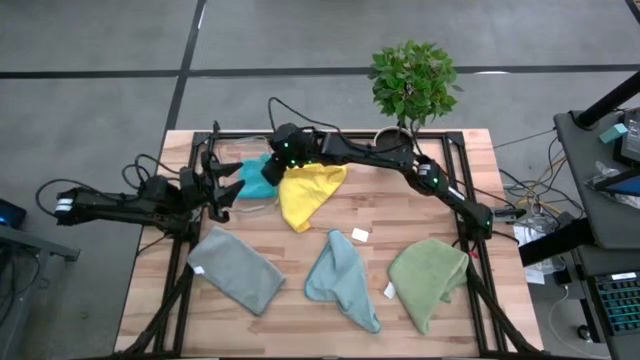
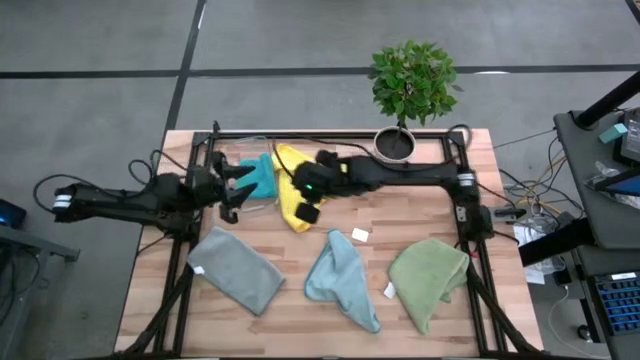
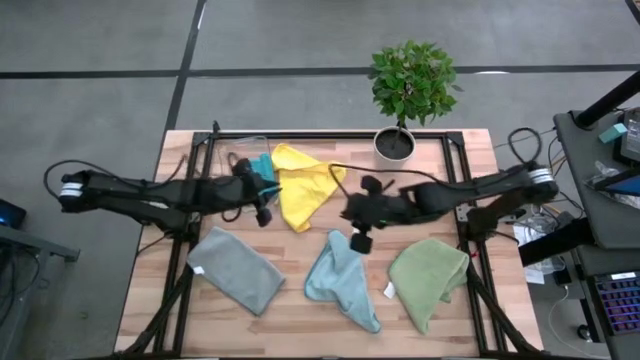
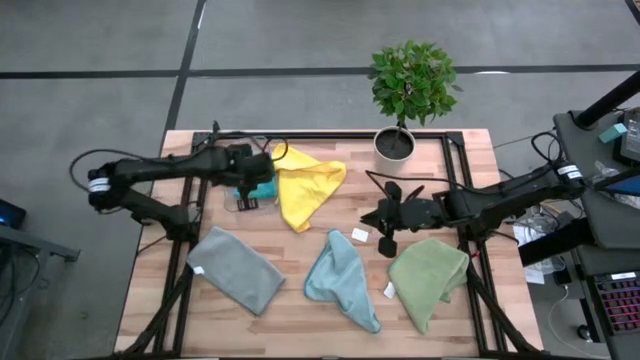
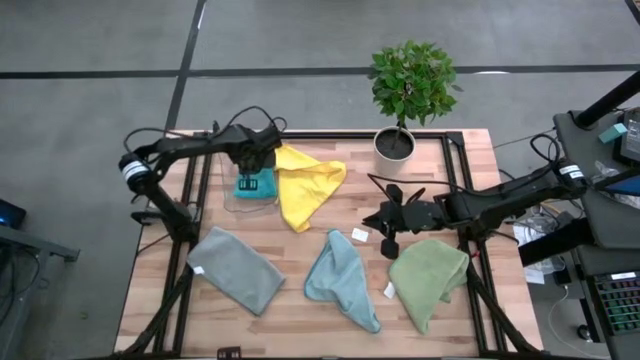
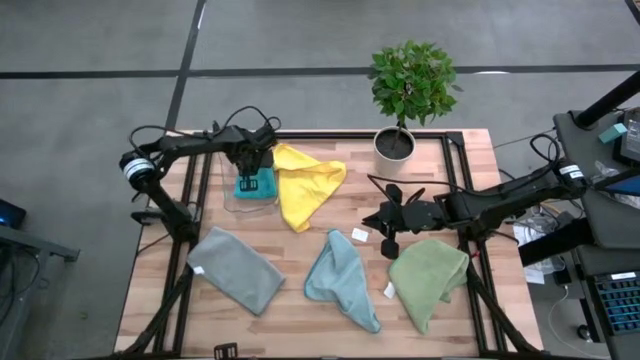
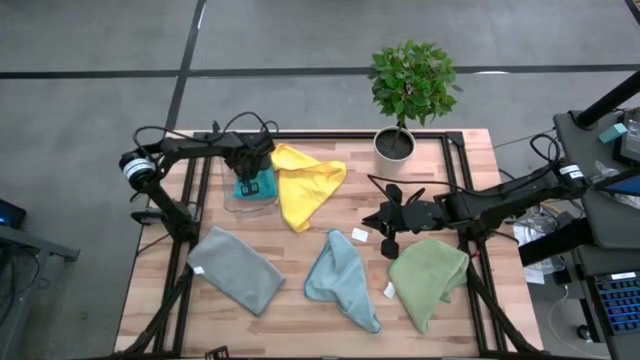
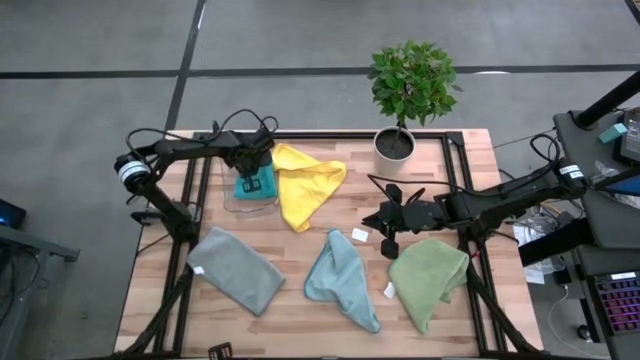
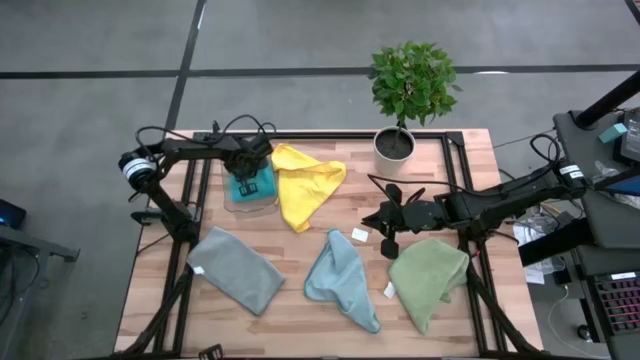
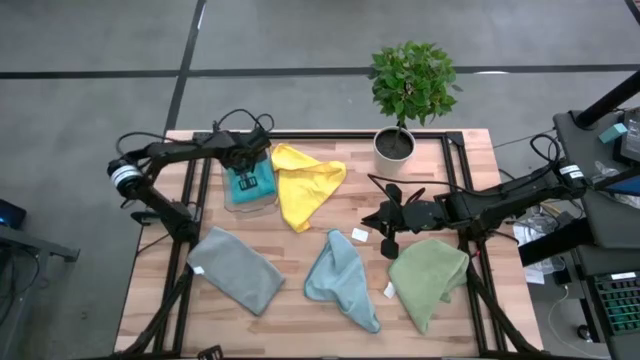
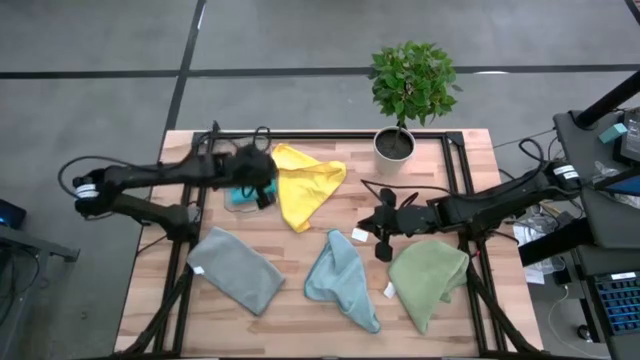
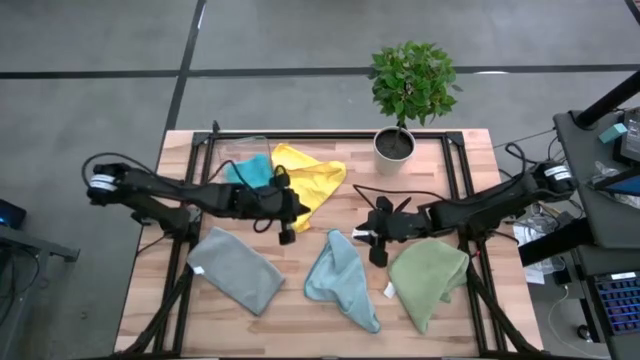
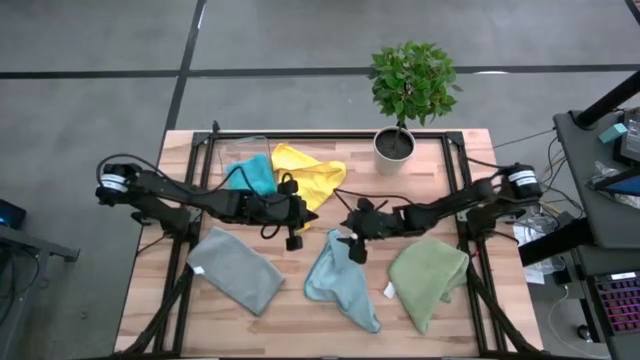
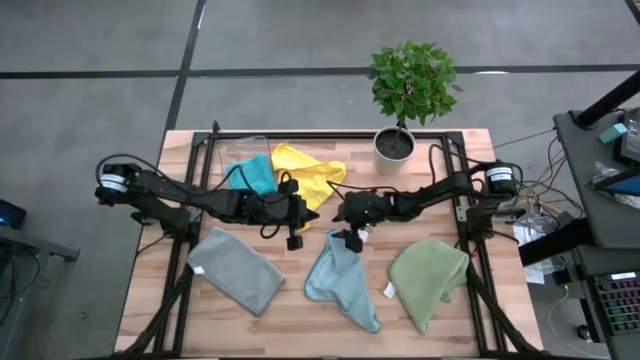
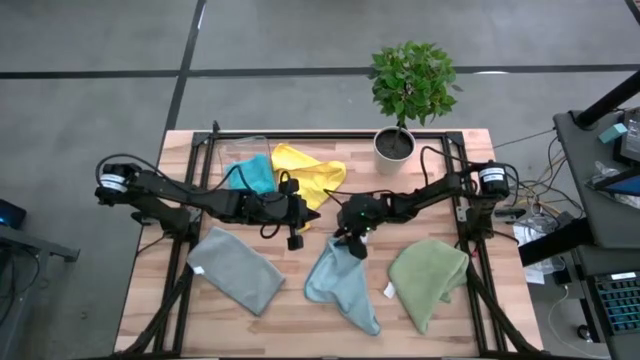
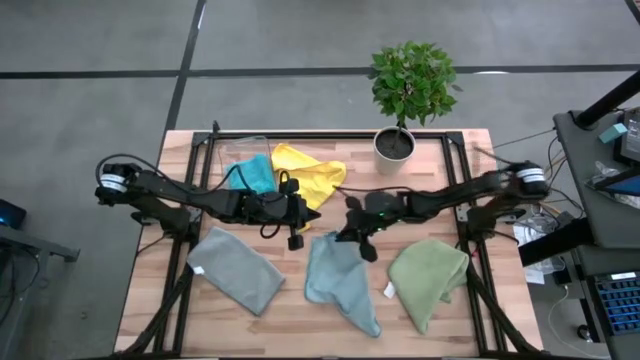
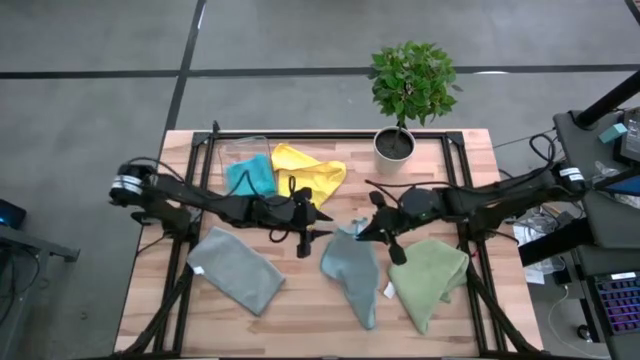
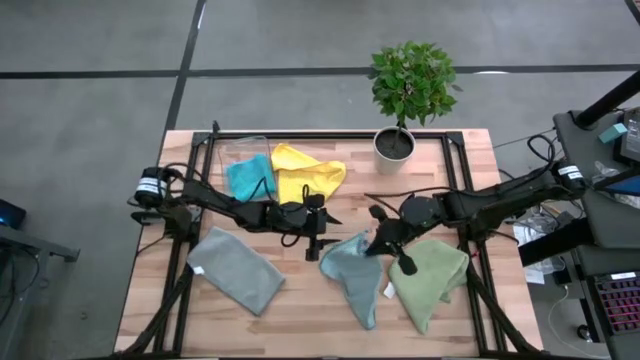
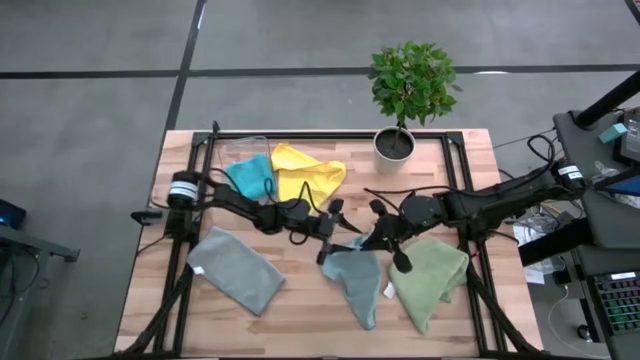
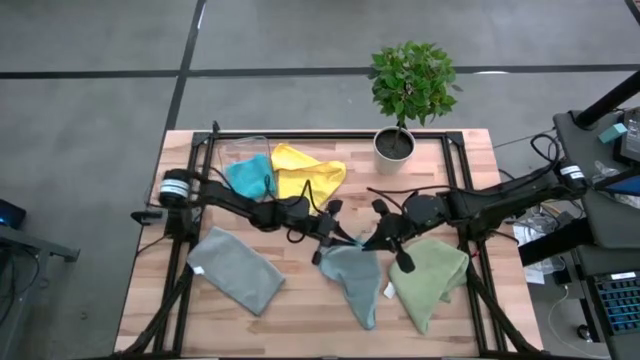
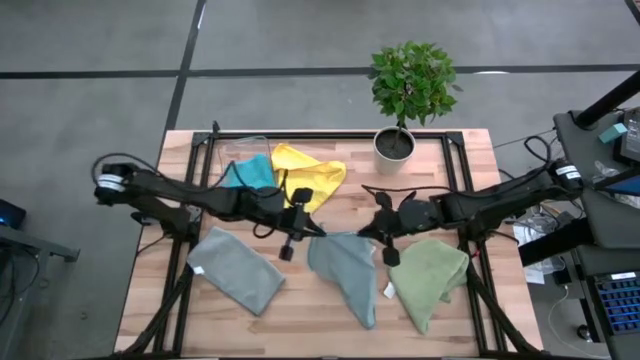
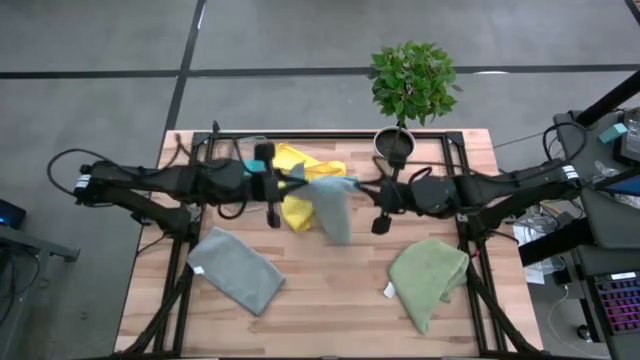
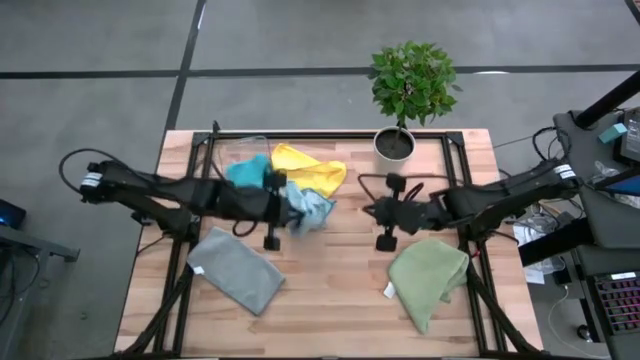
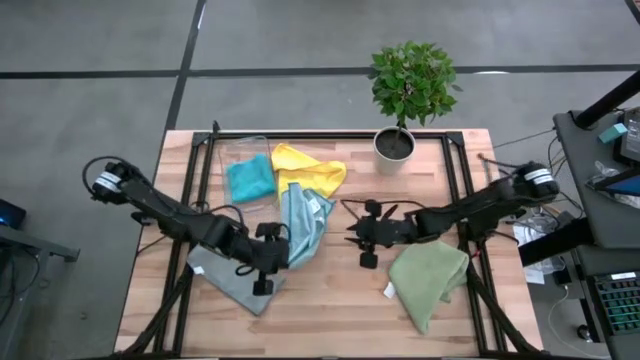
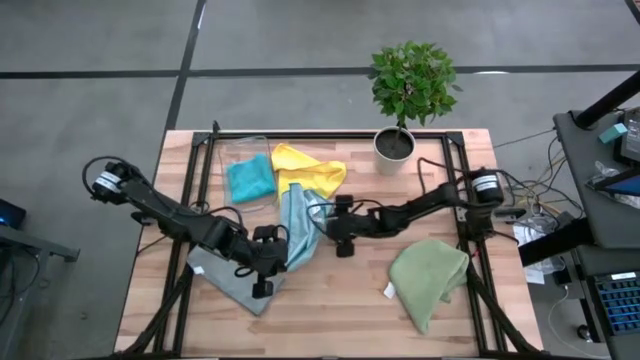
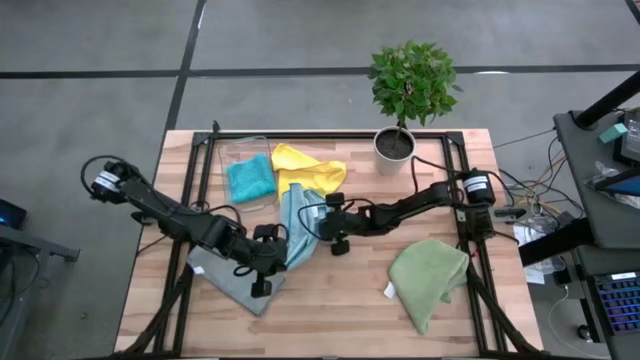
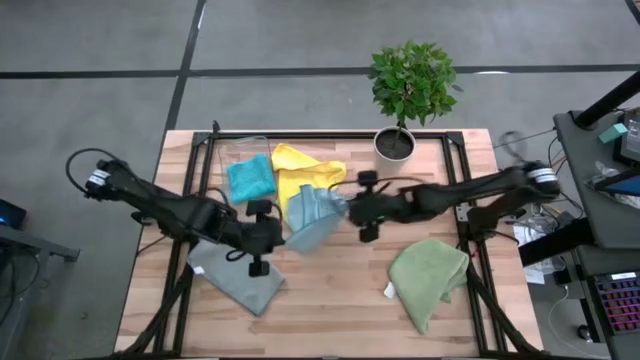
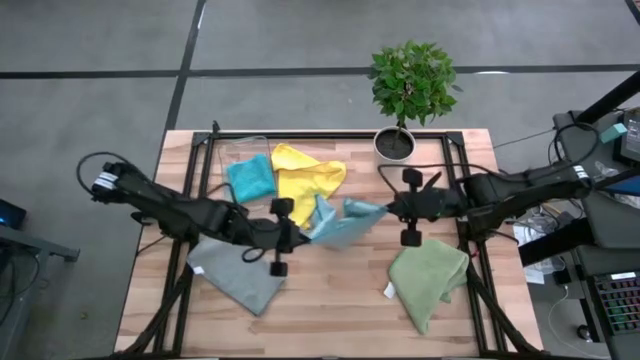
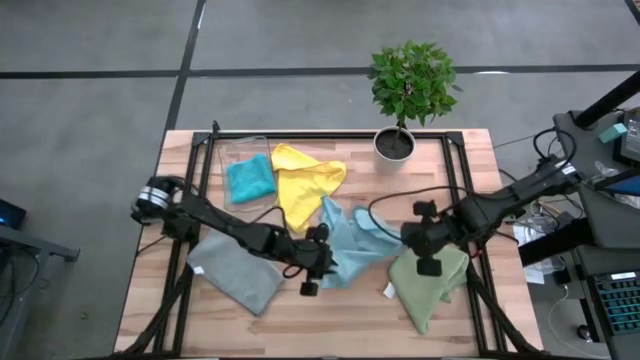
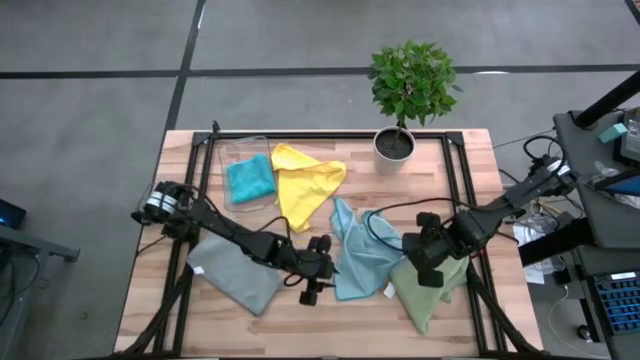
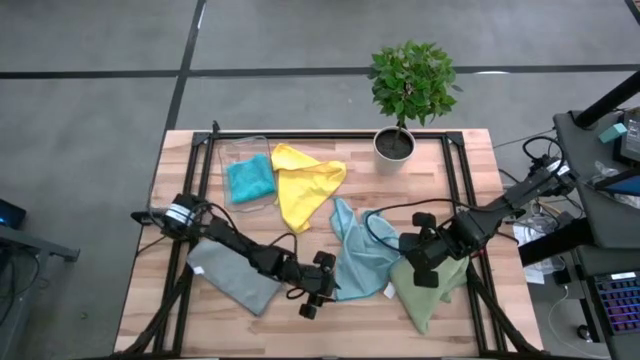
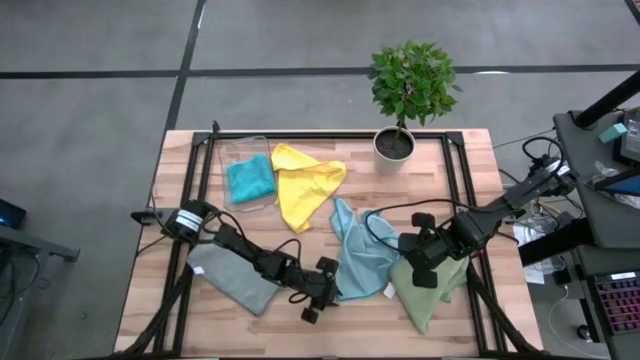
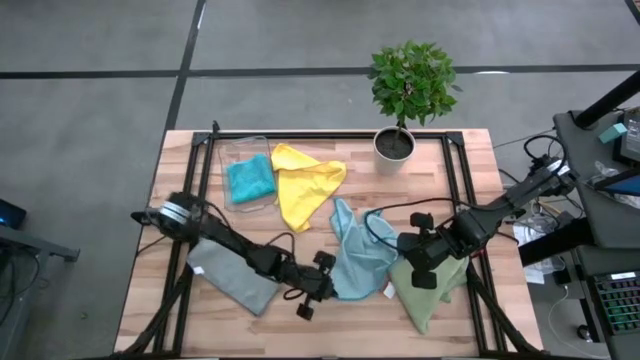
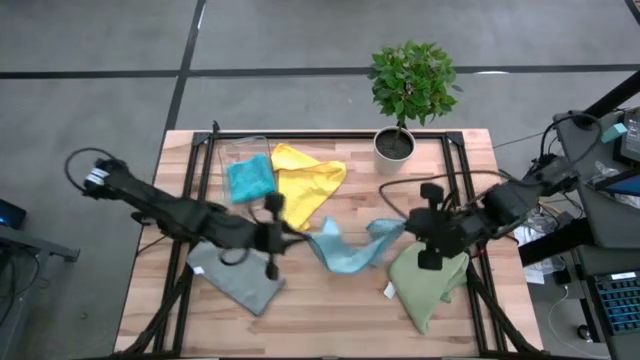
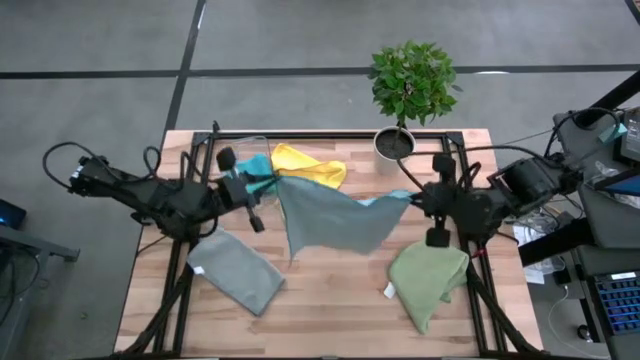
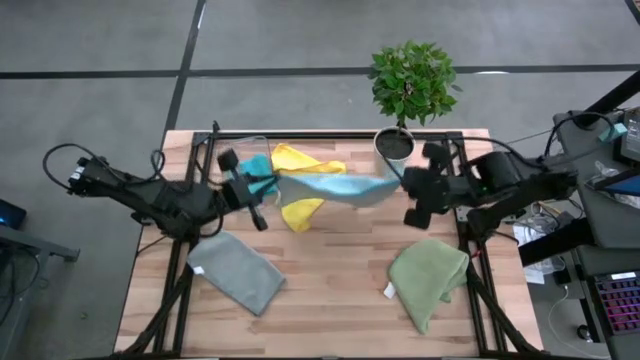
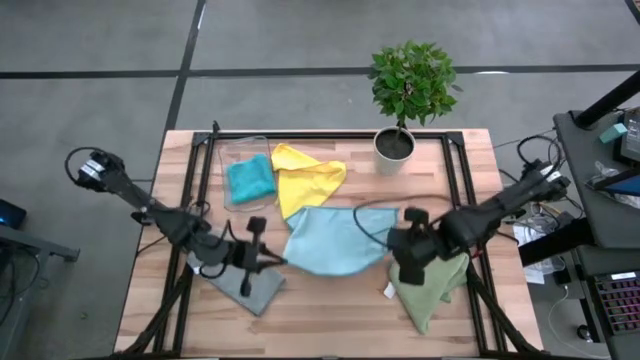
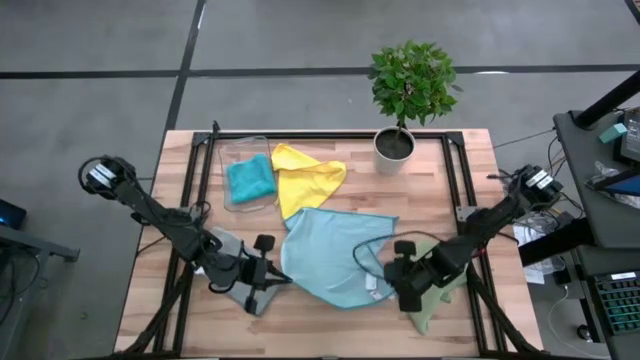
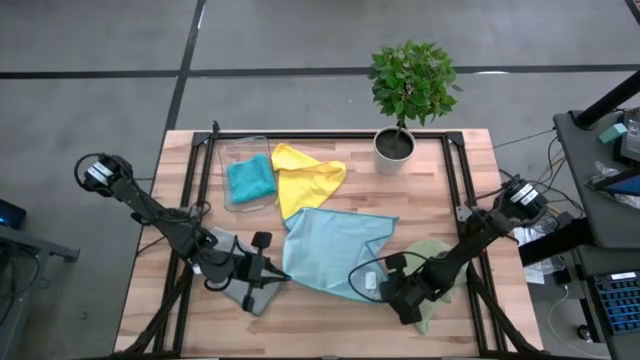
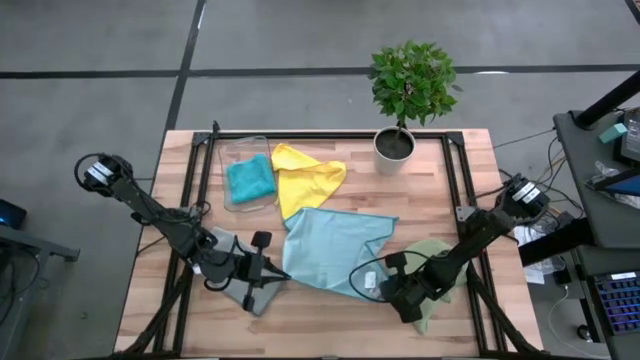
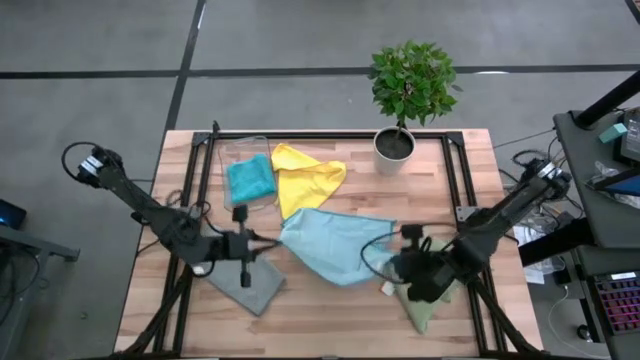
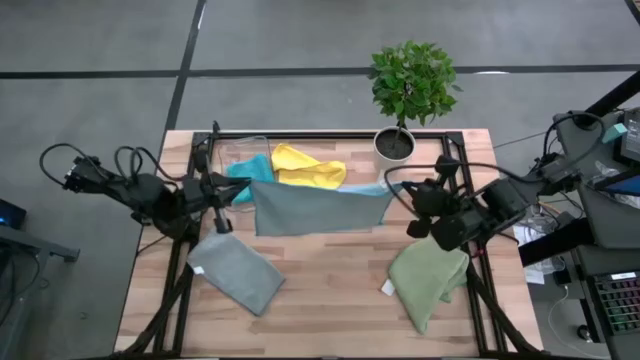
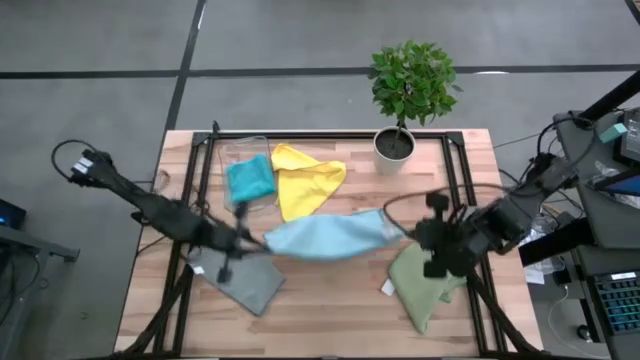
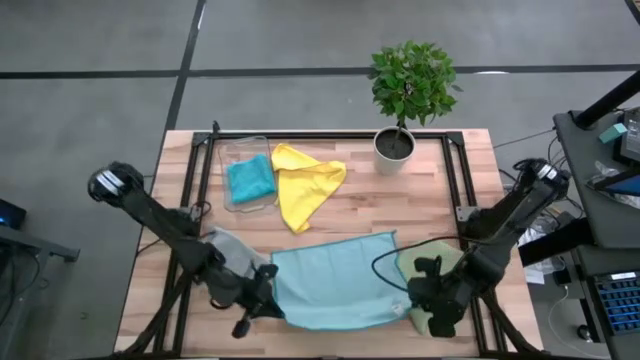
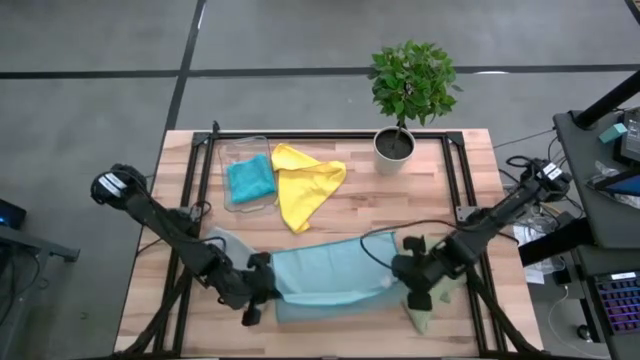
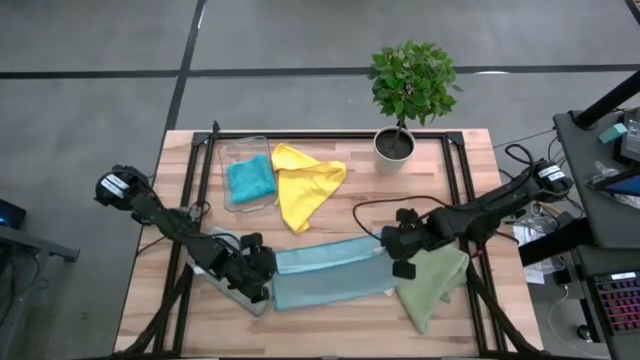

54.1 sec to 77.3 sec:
Task: Fold microfiber towels
Fold the light blue microfiber towel
